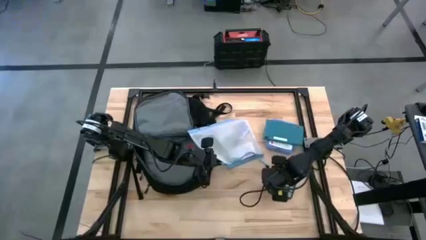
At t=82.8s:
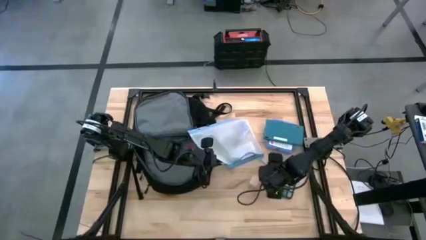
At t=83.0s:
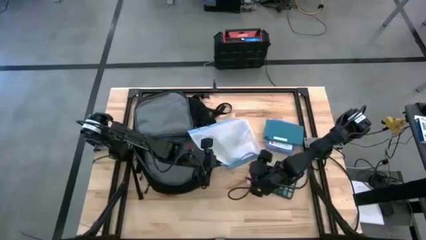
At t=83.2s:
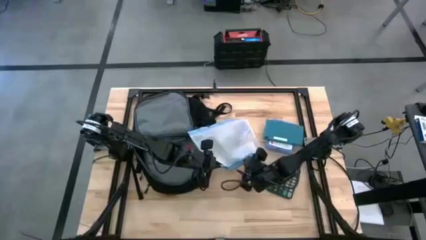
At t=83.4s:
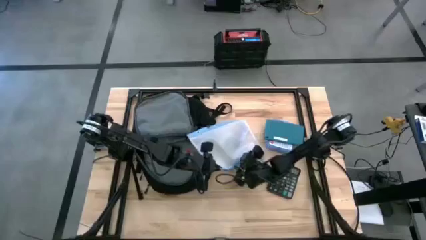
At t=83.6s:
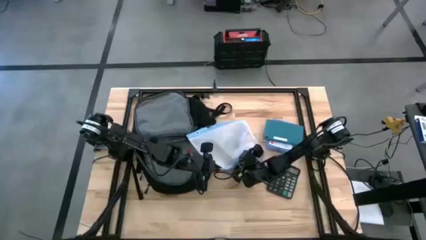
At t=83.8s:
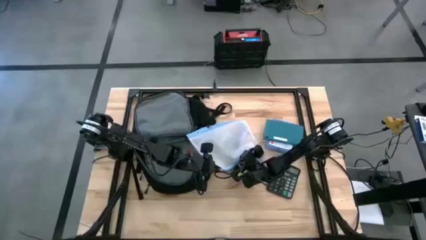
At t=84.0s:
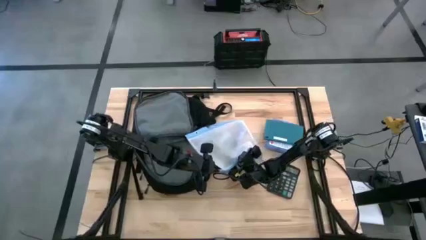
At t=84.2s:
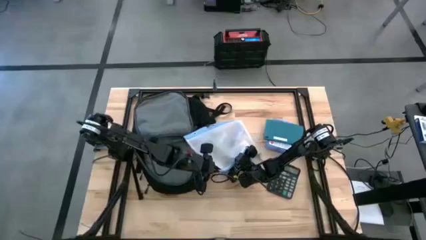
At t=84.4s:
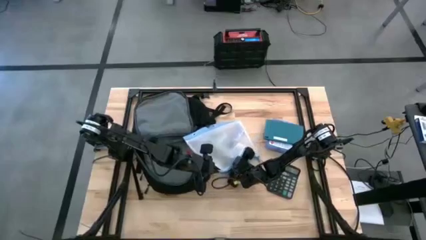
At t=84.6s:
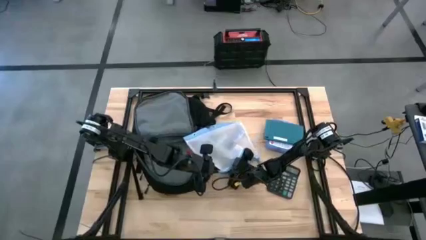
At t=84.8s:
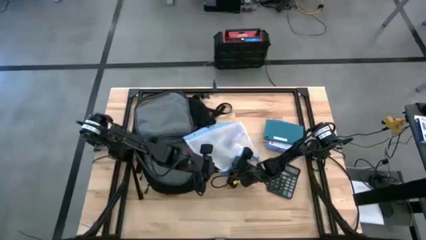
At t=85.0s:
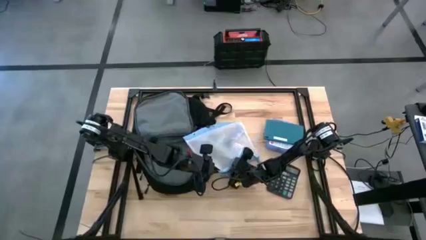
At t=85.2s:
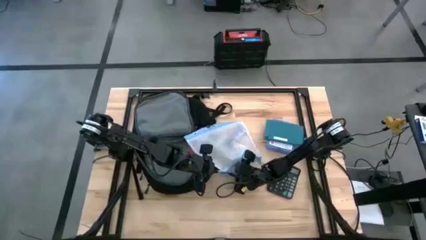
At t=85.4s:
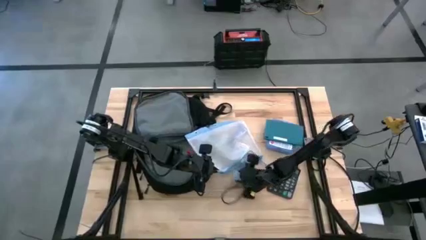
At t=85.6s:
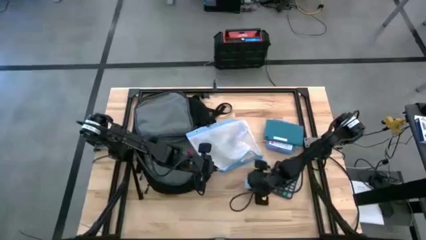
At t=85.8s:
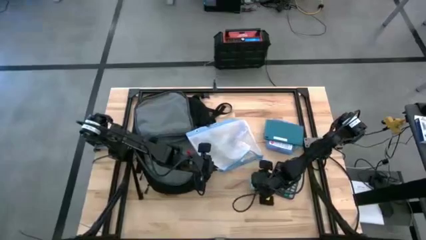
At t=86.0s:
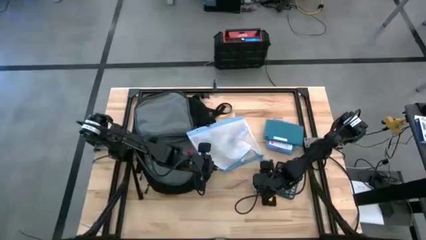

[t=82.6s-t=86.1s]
Task: Unpack backpack
Remove the blue charger adapter from the white zipper pouch

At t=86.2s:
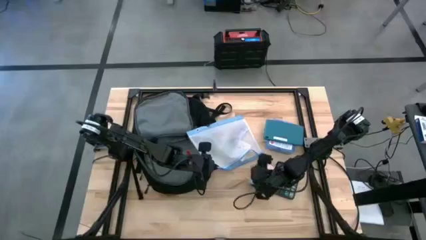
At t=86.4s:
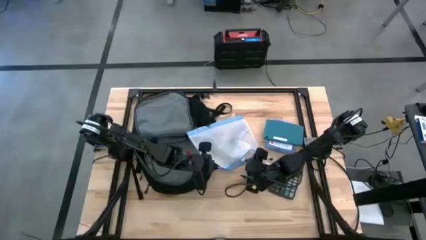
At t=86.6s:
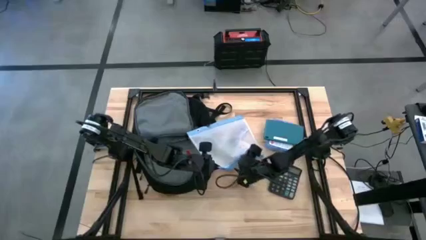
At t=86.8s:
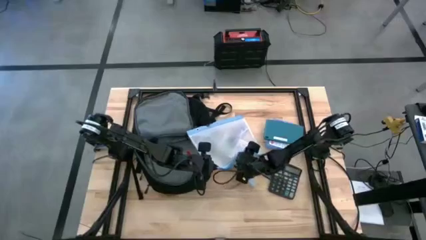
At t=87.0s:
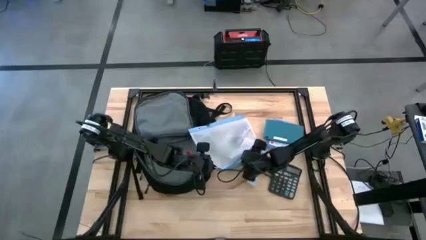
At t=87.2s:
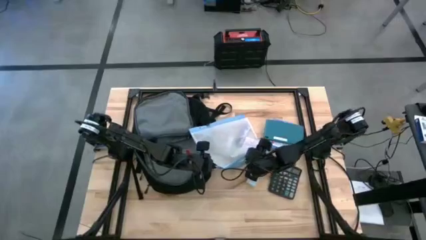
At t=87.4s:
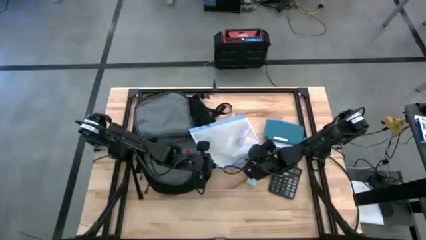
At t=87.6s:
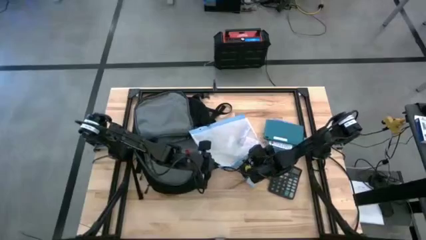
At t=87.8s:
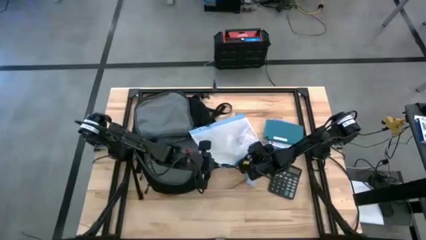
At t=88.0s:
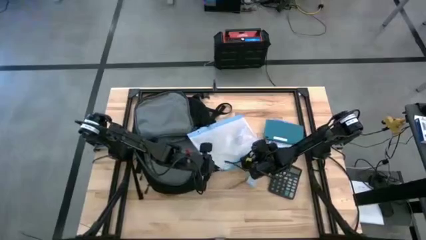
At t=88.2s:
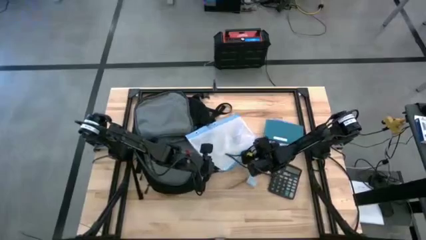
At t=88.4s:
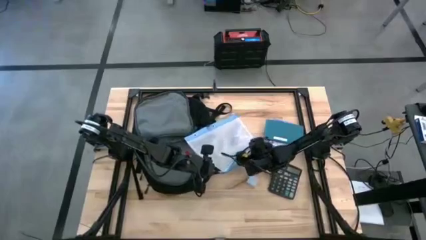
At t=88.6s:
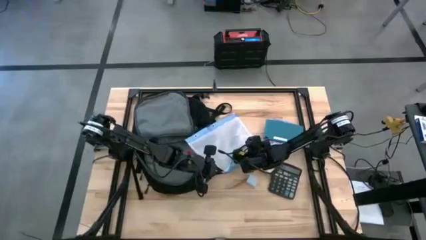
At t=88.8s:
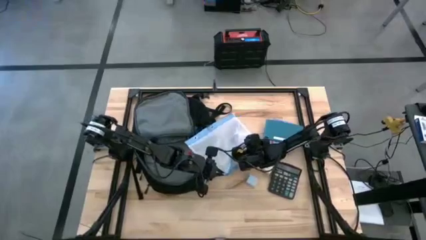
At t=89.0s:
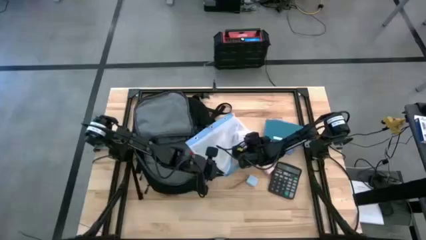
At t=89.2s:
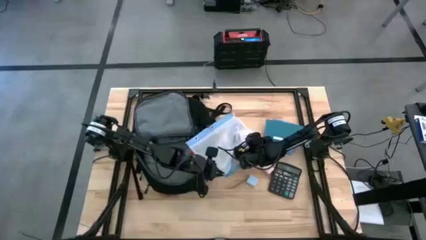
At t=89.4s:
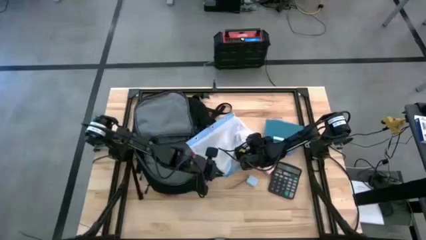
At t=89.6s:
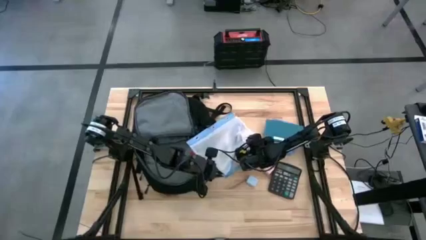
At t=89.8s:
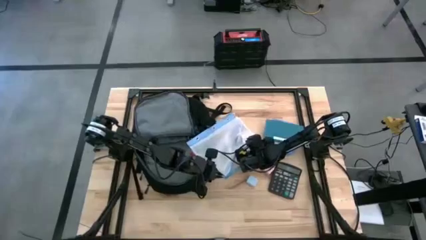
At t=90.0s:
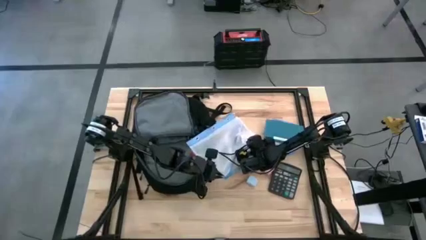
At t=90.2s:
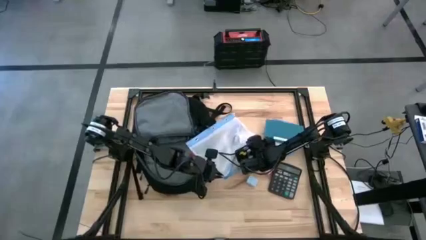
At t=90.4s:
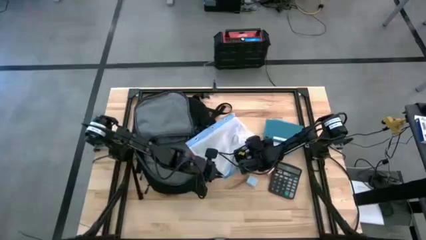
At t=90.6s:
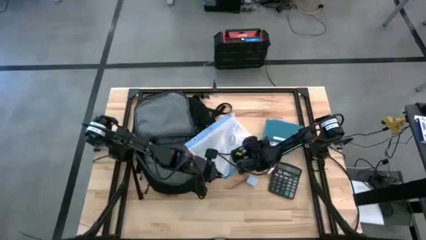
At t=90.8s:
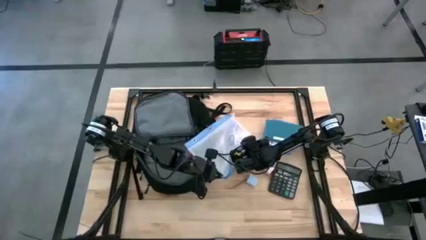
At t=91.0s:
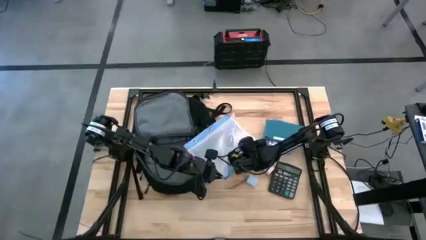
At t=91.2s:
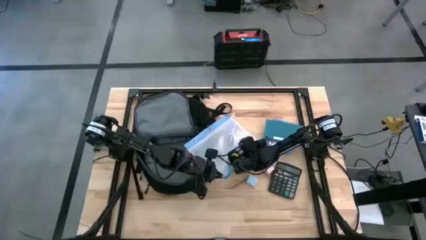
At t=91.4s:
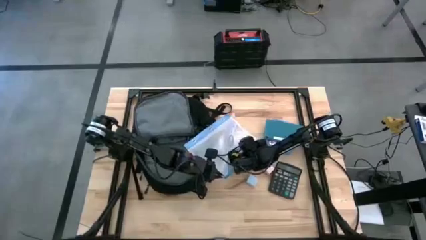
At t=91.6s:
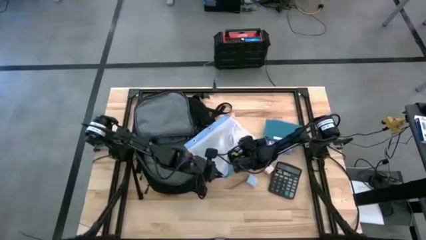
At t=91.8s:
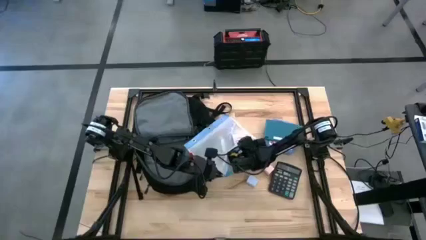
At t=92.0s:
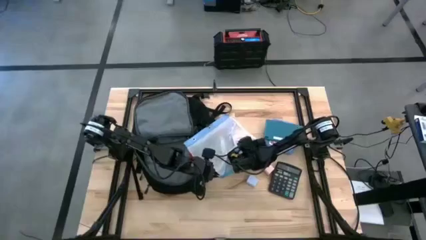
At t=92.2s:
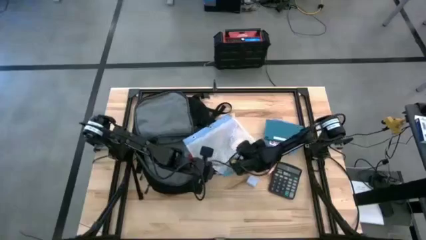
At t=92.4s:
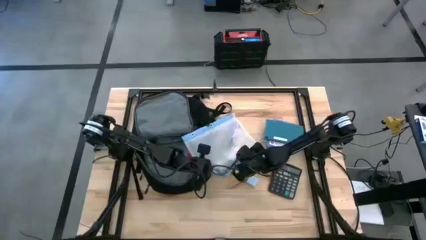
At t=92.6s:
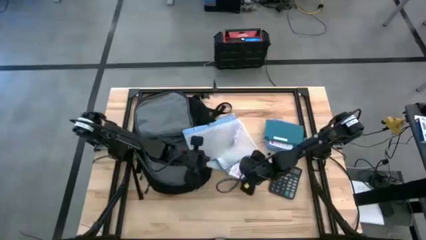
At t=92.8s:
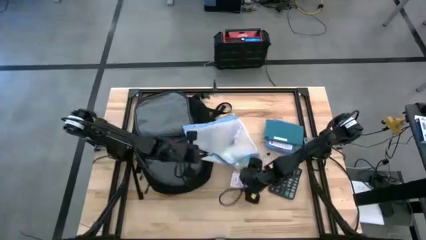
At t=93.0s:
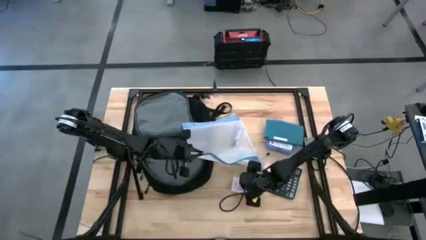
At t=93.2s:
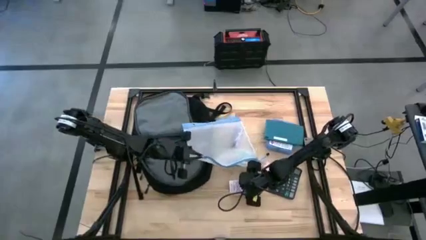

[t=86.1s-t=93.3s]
Remove the red playing cards from the white mesh zipper pouch

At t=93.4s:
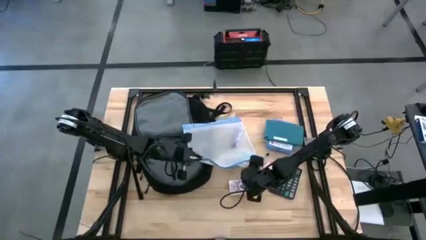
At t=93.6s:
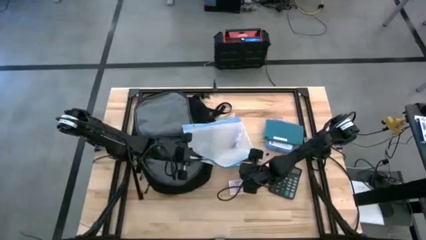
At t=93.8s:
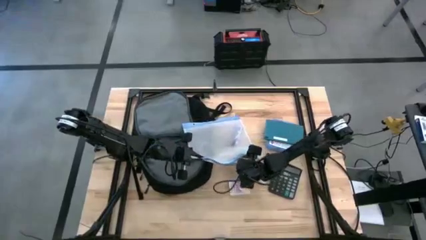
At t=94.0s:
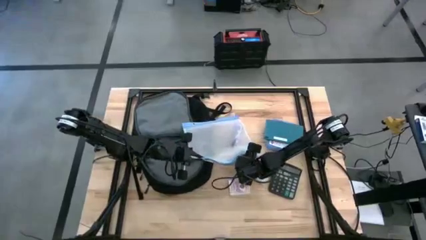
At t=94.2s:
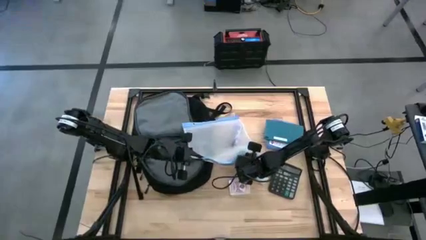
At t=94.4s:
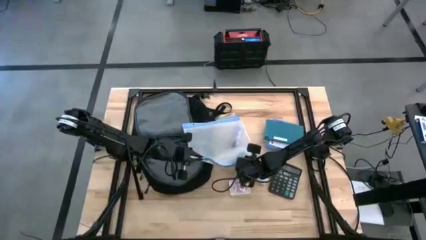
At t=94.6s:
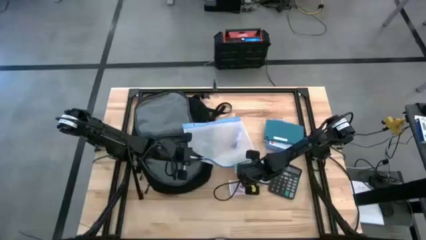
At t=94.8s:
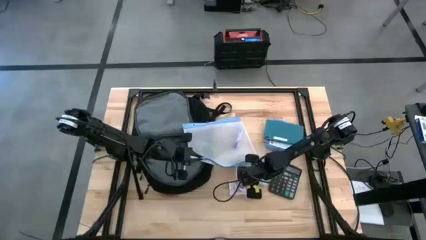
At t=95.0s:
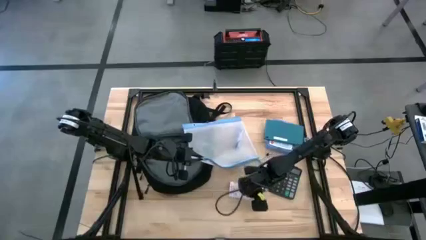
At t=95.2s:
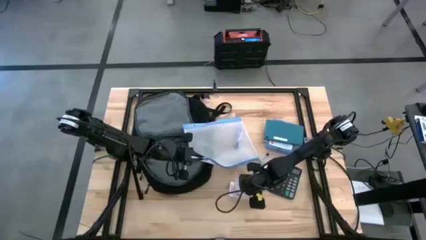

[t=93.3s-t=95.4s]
Remove the green earphones from the white mesh zipper pouch

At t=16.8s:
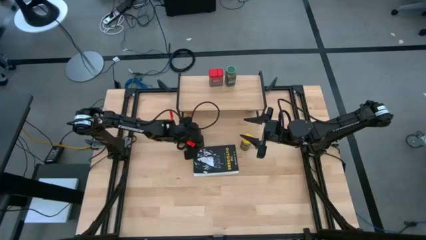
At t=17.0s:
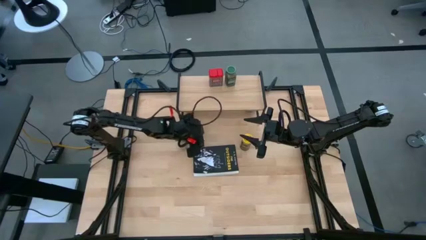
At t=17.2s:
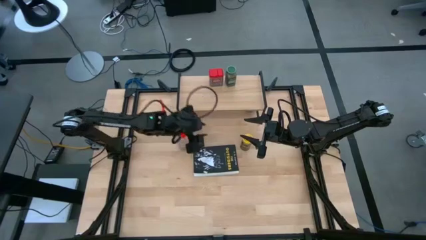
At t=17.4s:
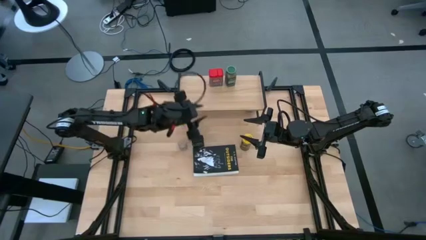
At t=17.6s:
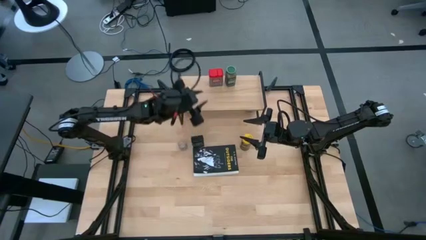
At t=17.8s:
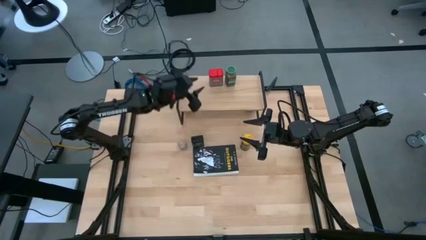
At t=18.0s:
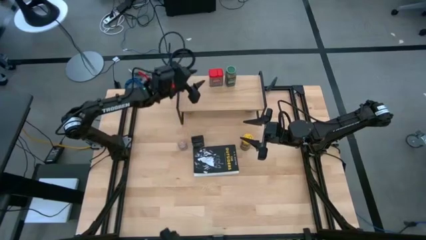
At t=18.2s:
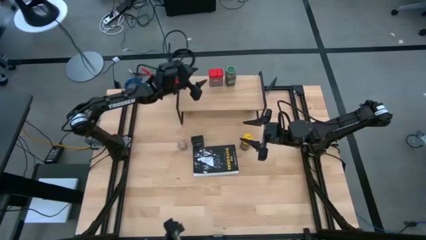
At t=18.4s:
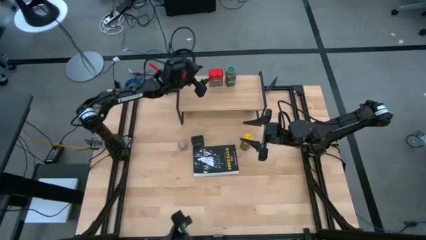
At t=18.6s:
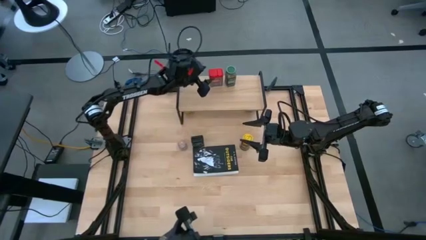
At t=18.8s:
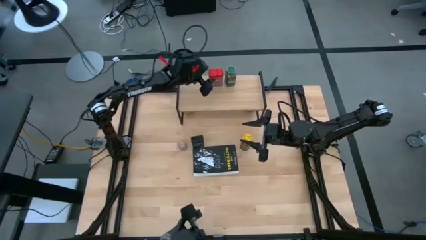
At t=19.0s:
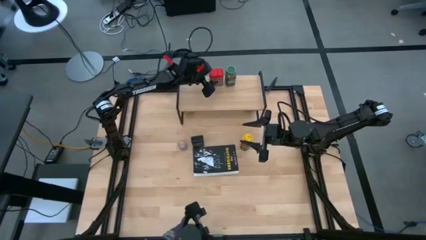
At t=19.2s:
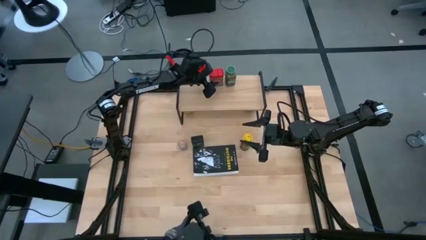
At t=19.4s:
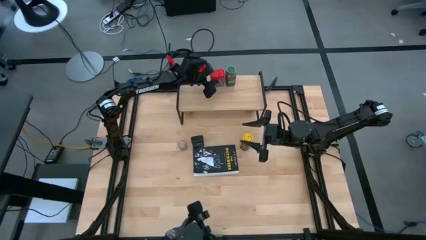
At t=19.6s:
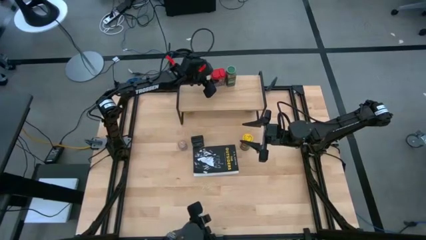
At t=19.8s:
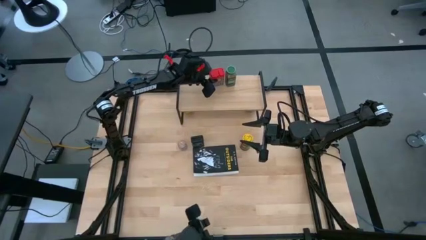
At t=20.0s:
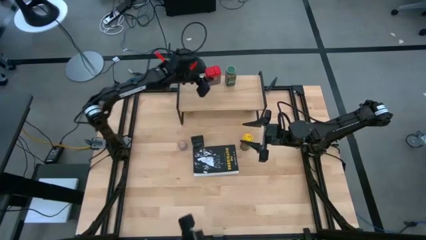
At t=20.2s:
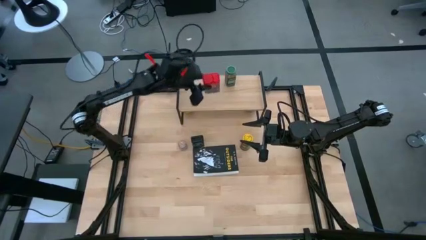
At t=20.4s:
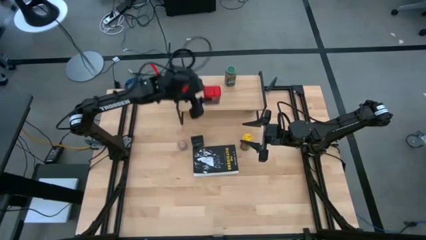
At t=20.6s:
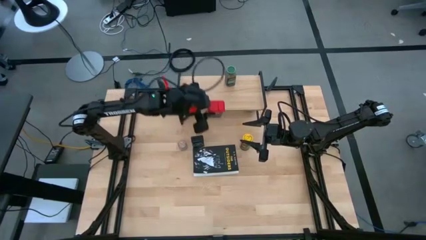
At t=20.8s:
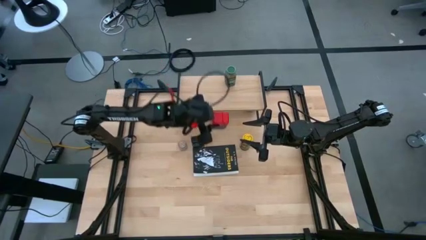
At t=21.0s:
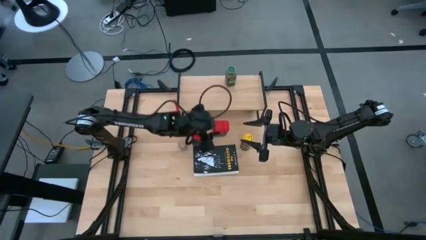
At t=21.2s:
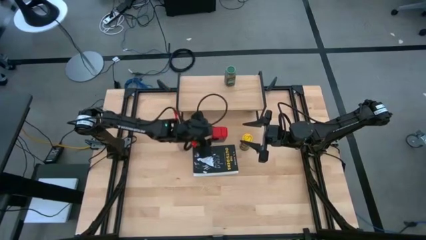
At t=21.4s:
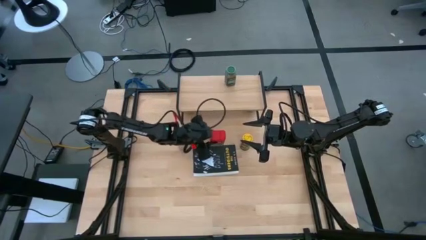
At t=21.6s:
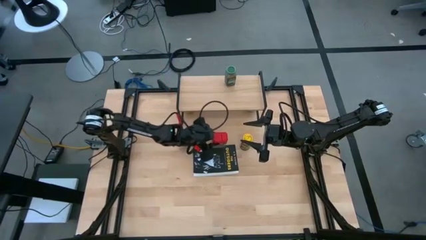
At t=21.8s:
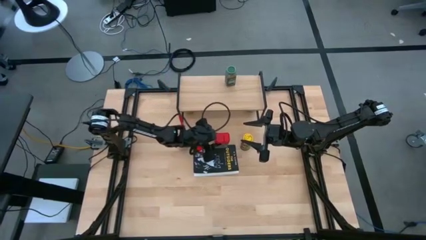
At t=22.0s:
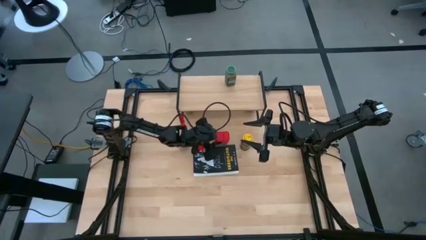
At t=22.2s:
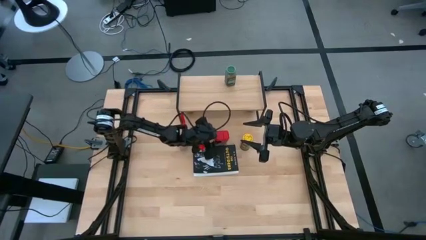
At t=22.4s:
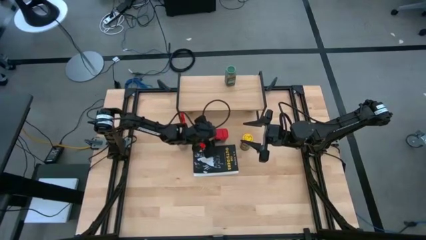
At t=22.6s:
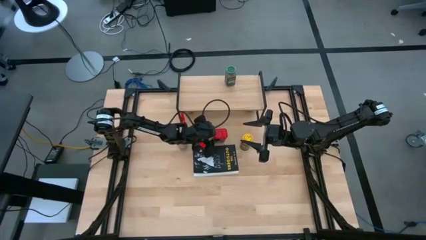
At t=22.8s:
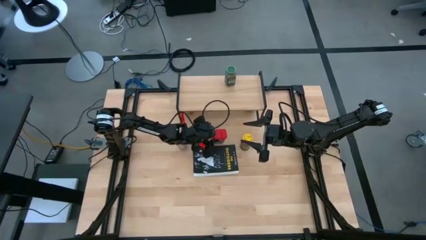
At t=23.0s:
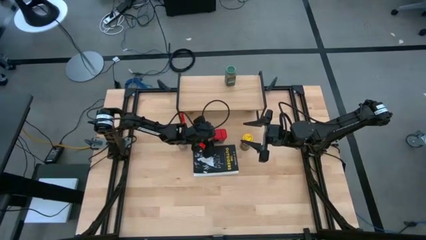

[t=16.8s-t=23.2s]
Task: Shelf spices
Remove the red seasoning can from the shelf
